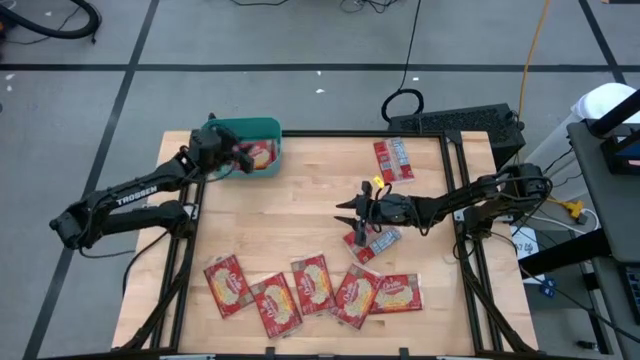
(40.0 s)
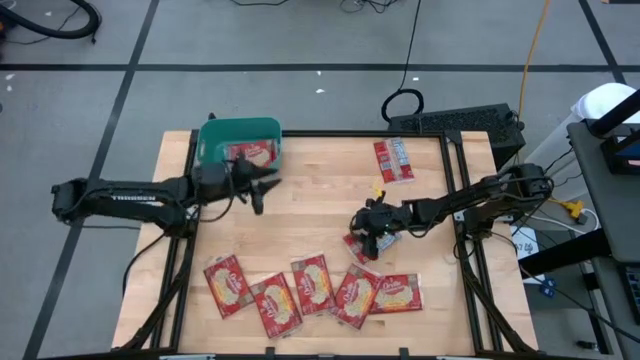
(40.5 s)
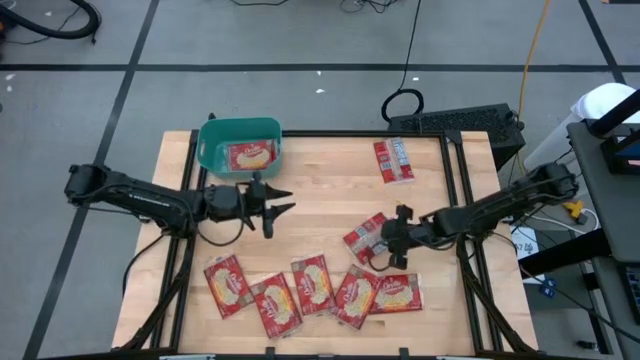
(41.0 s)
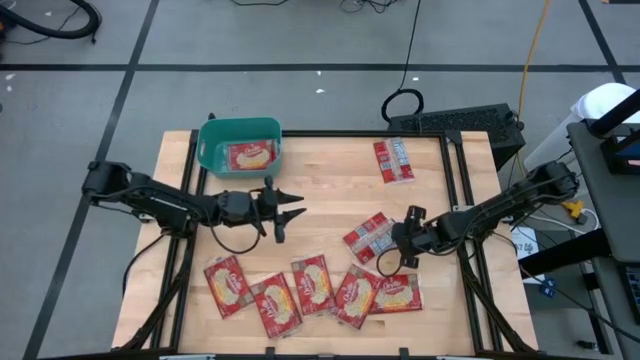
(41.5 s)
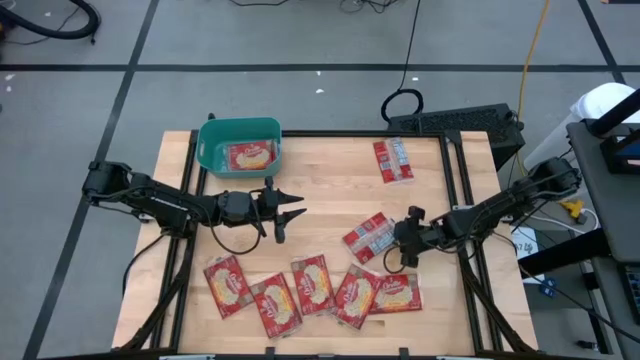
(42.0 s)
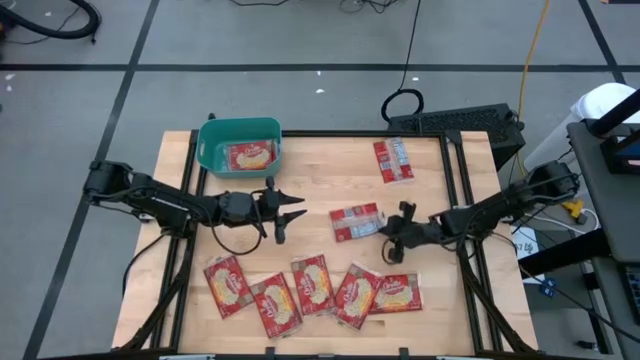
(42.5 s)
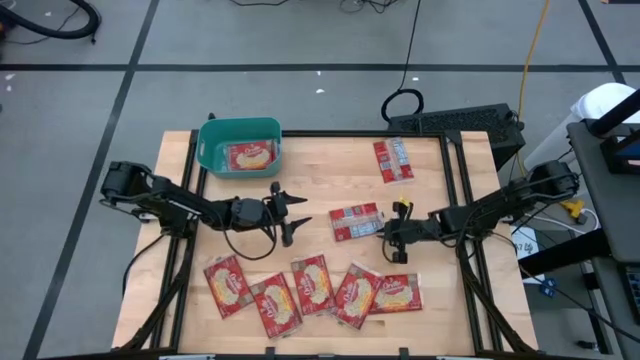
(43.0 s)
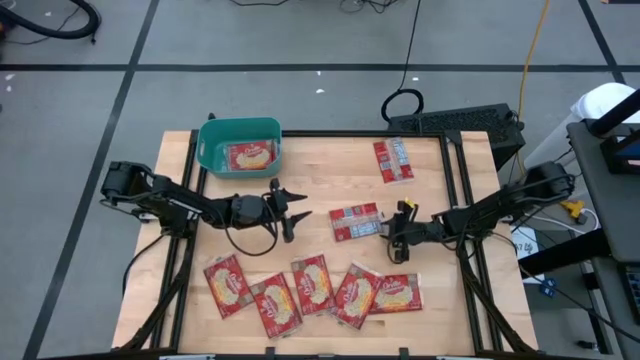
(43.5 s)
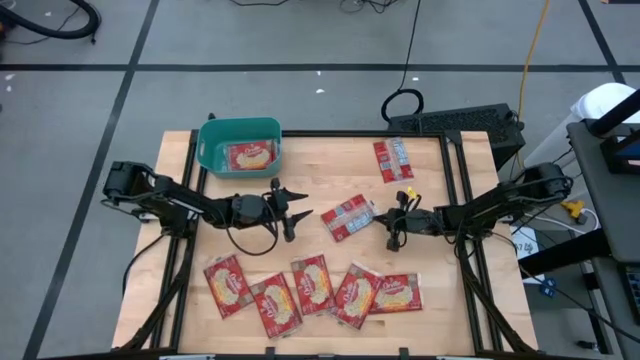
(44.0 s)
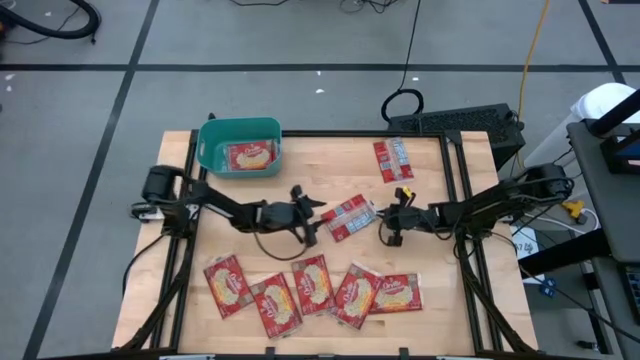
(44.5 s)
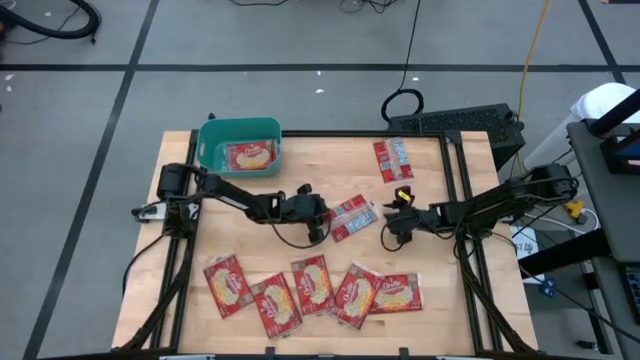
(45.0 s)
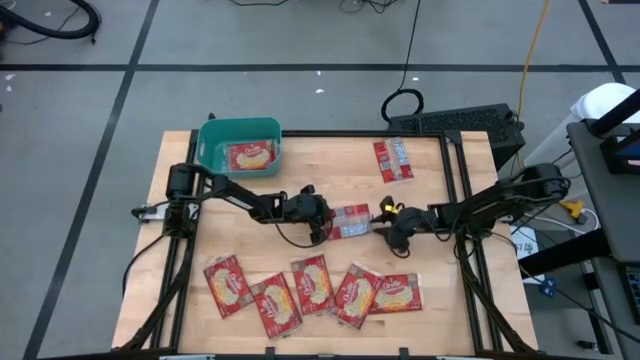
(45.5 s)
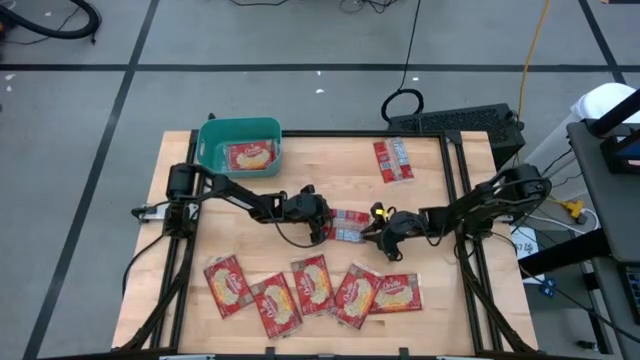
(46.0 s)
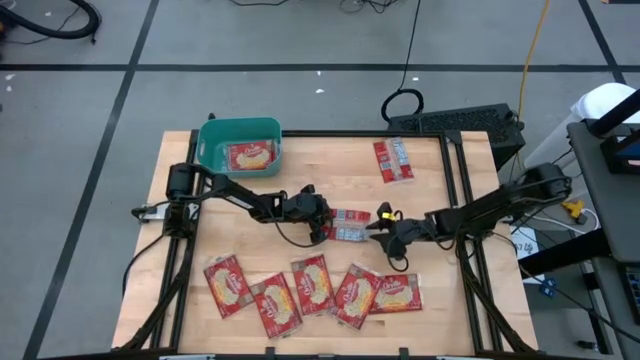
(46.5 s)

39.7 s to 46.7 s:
Task: Sort popcorn bags into baskets
Put the red popcorn bag into the green bin

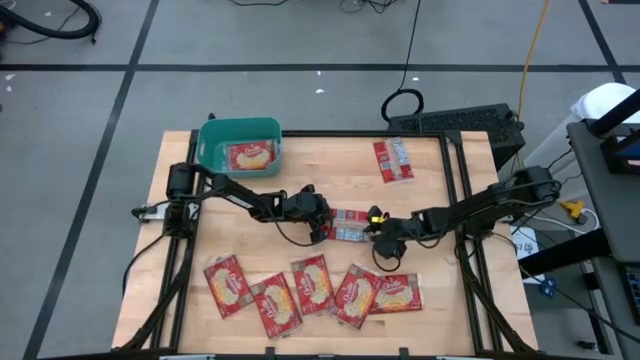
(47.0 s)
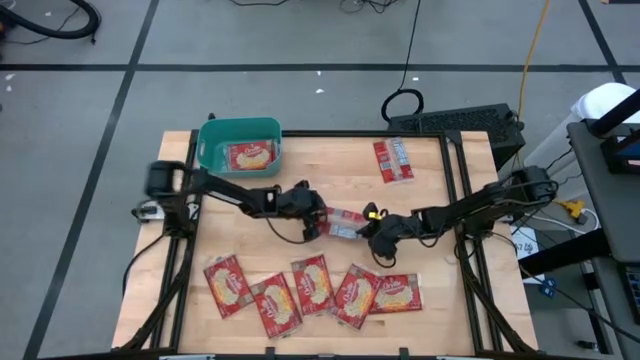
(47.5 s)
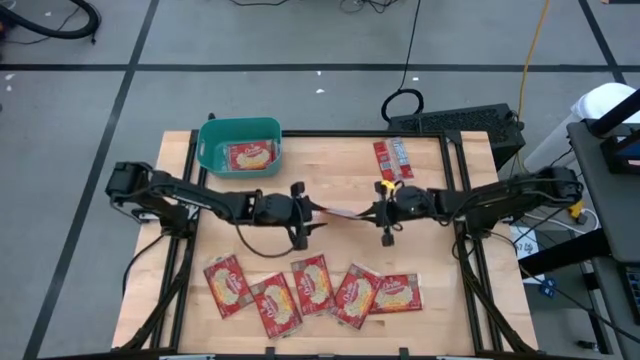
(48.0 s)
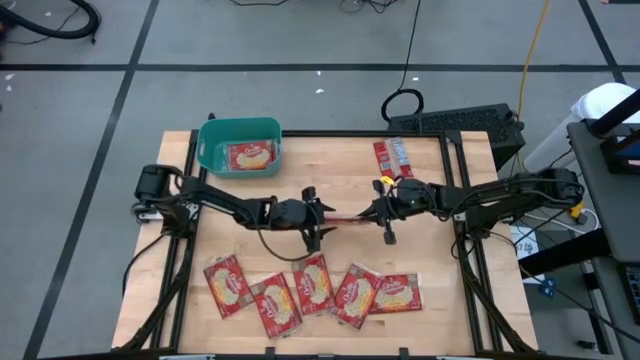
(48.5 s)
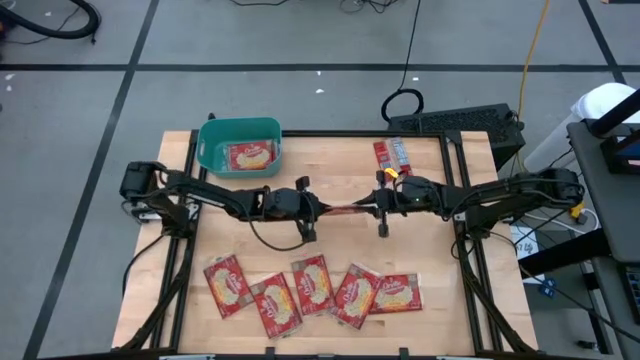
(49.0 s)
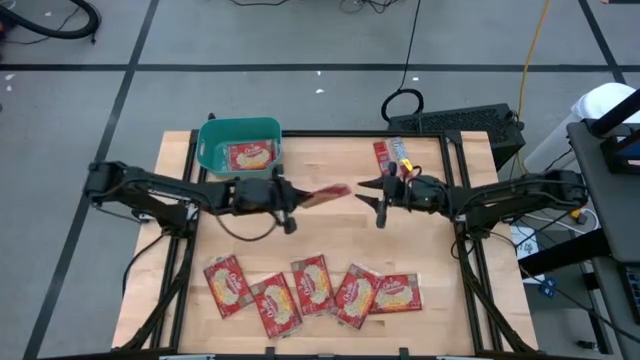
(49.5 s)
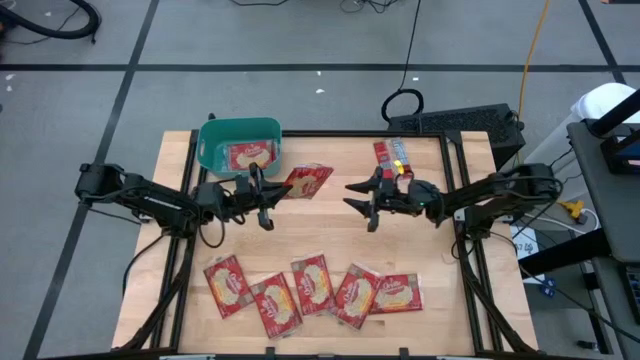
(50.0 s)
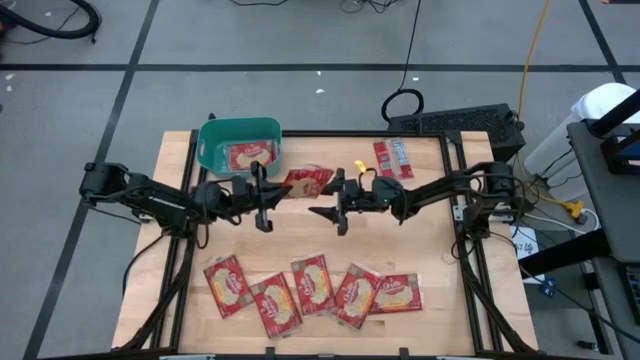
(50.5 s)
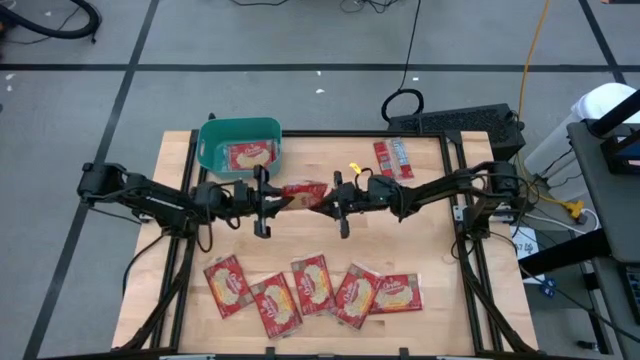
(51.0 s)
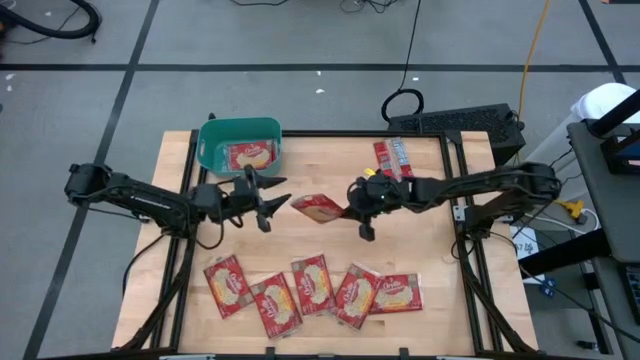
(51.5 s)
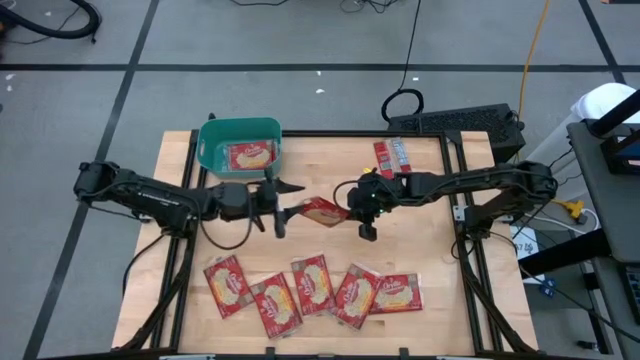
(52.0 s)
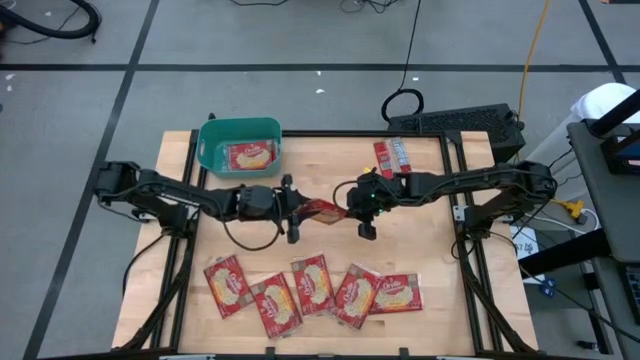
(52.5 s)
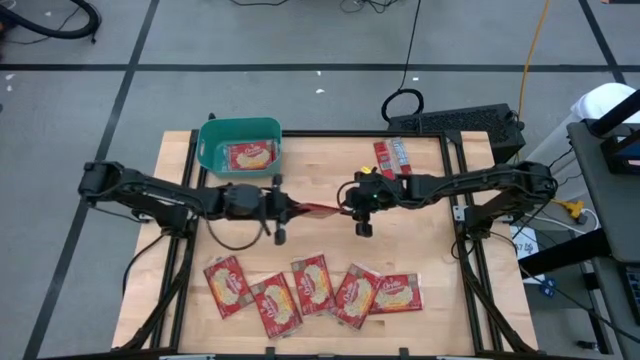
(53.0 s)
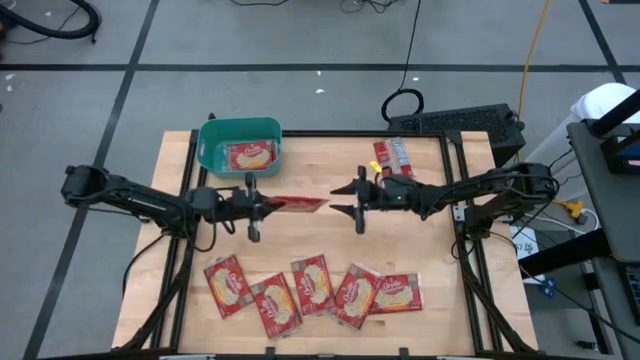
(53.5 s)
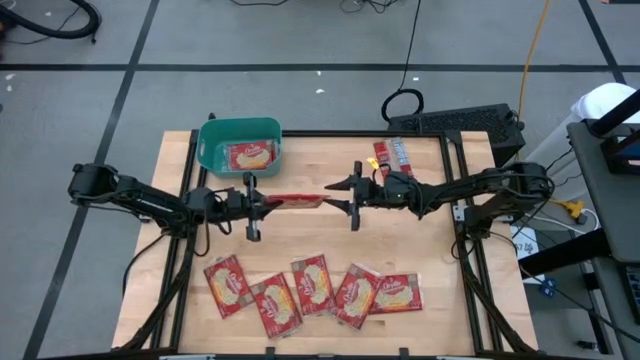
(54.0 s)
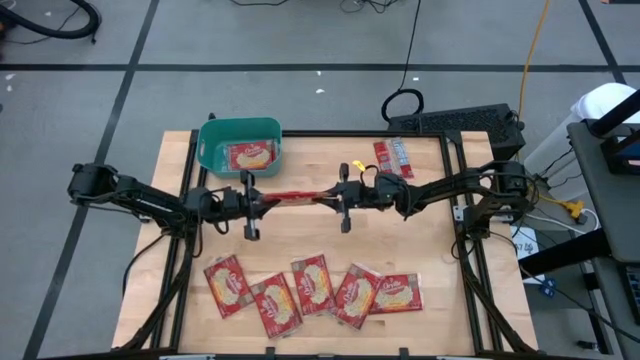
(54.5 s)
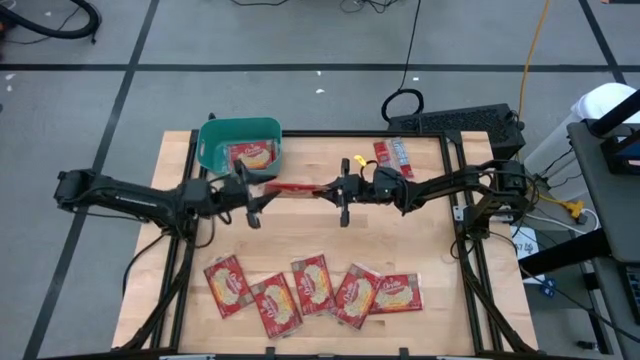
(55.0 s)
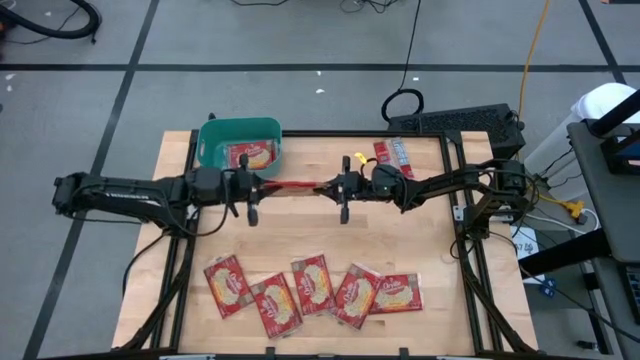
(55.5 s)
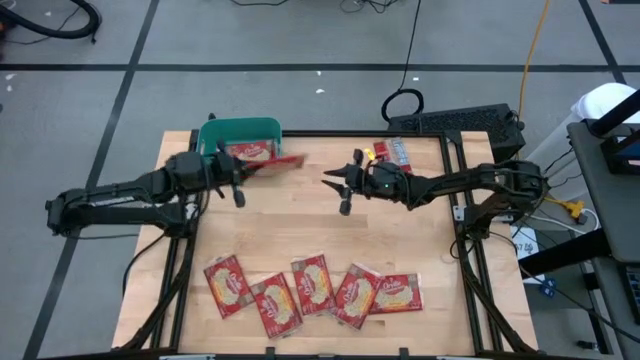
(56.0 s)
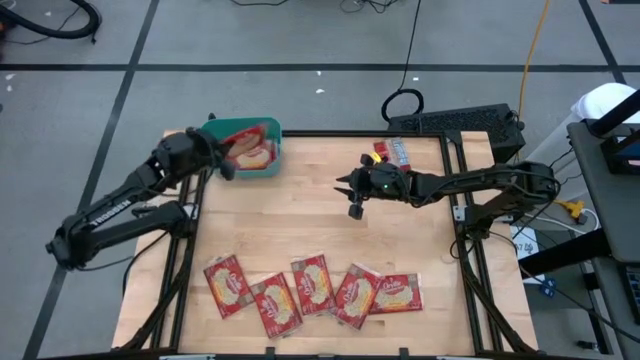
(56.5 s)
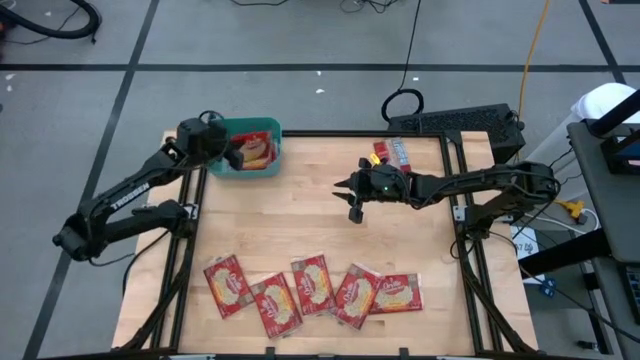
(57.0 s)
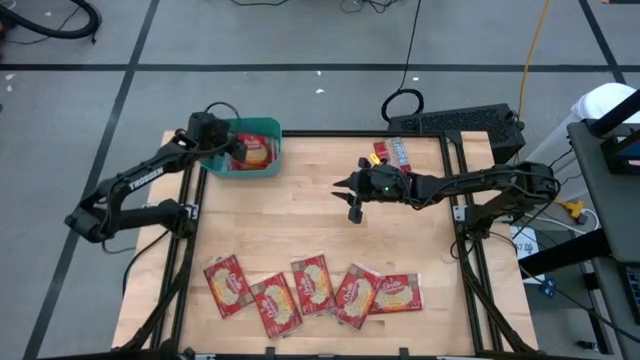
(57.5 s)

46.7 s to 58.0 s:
Put the red popcorn bag into the green bin

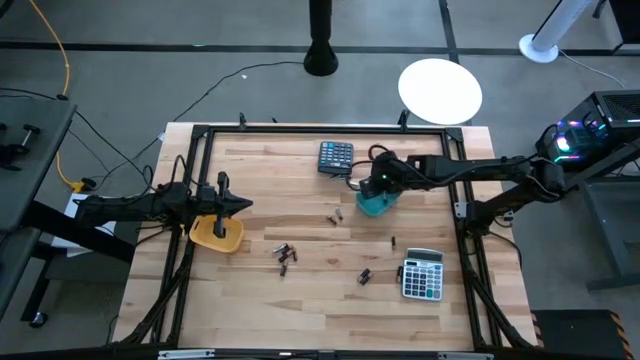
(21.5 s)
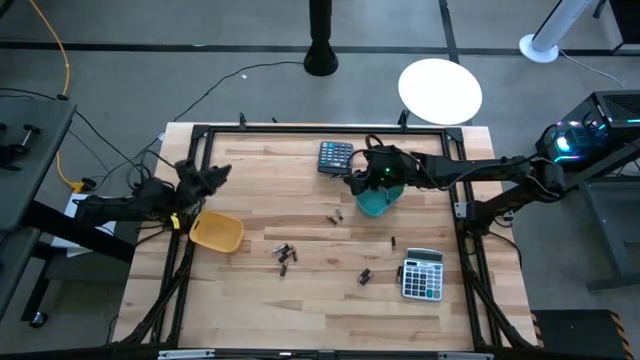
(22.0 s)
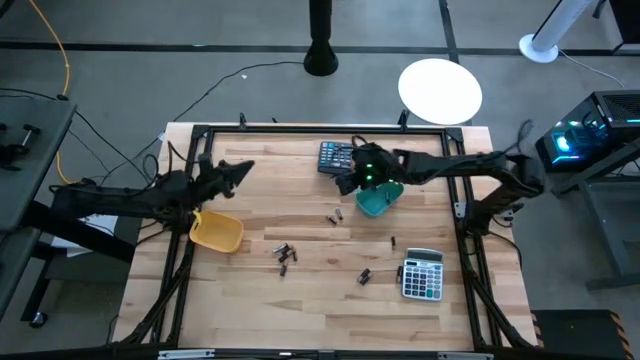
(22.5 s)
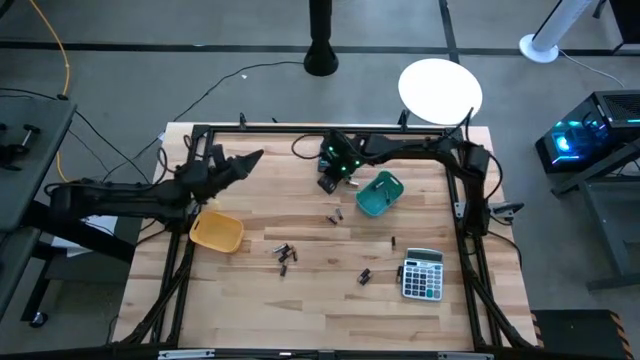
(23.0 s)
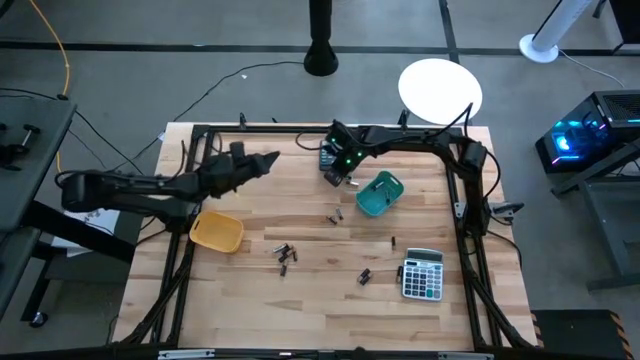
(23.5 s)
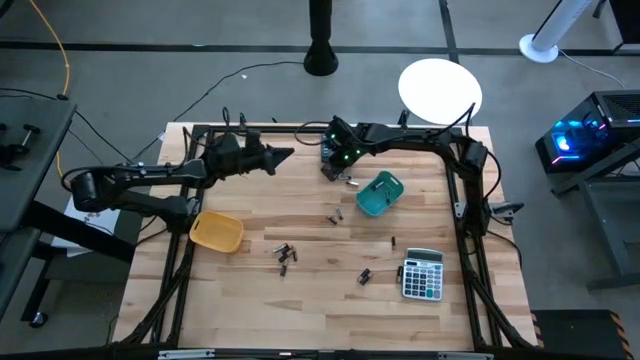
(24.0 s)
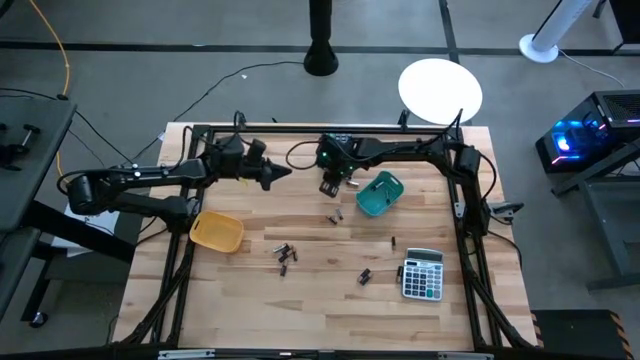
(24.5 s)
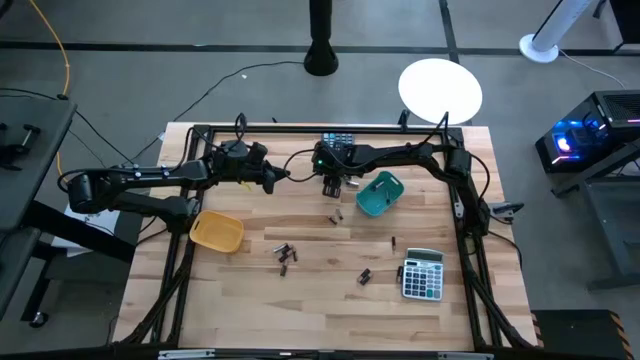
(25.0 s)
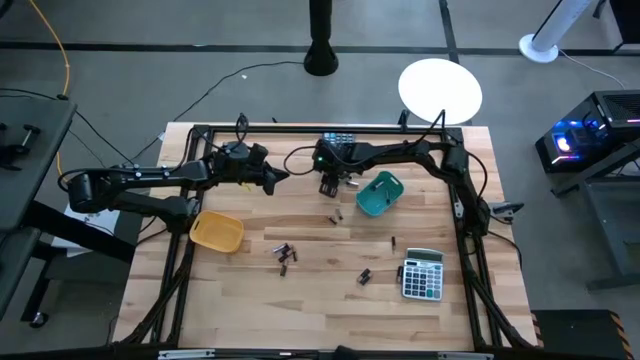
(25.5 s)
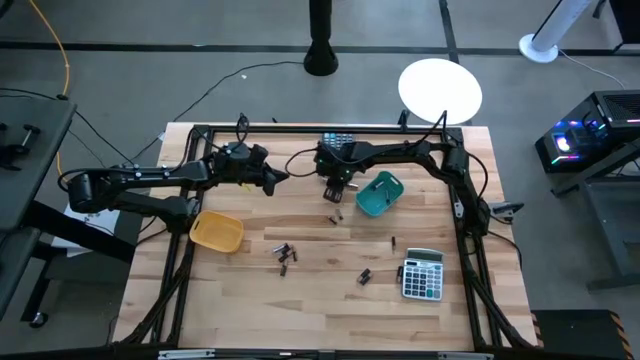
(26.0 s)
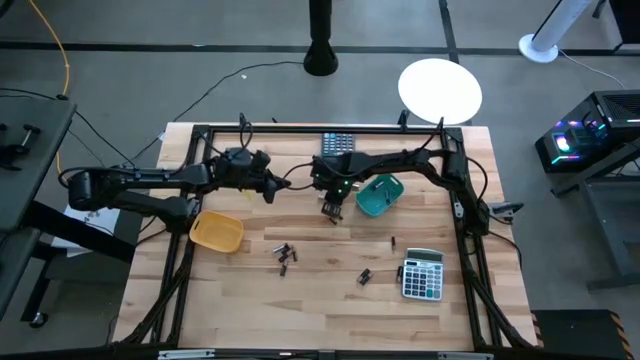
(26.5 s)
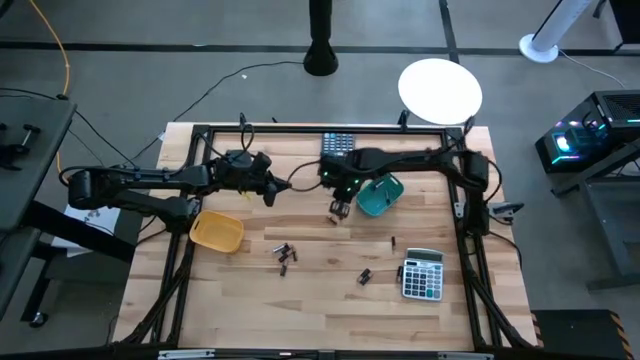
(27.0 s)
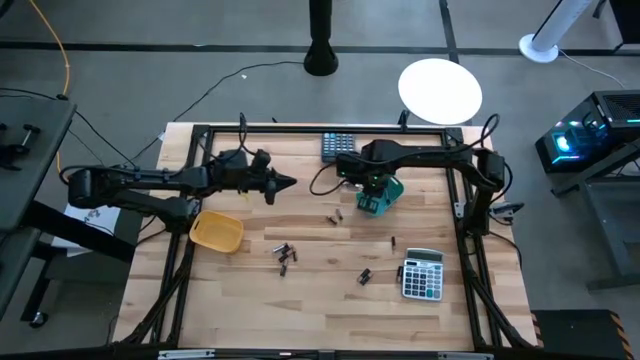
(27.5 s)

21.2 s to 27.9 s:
Task: Sort batteries
Put the silver battery into the green bin
